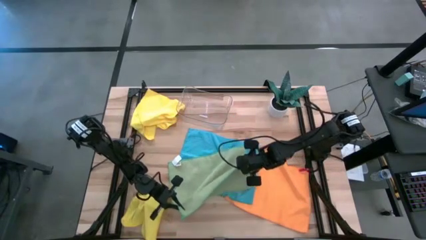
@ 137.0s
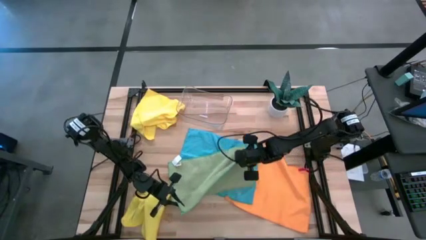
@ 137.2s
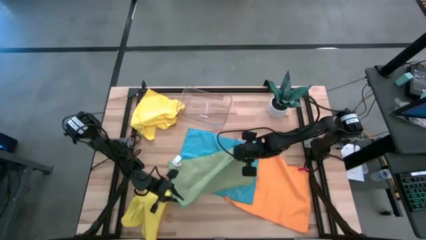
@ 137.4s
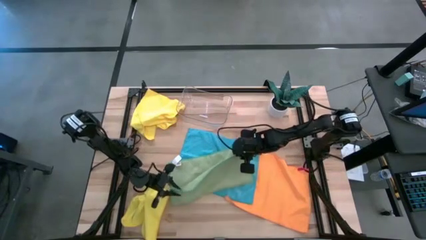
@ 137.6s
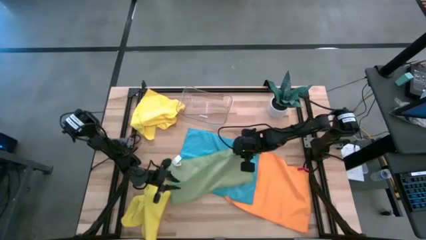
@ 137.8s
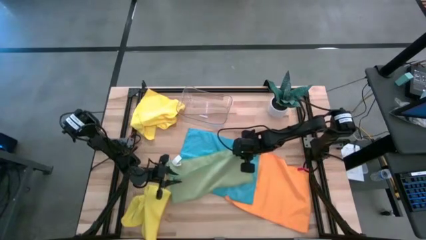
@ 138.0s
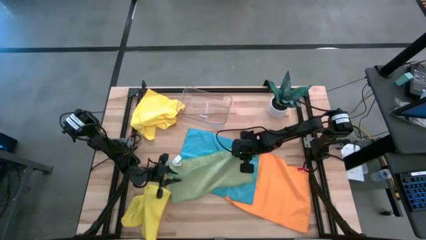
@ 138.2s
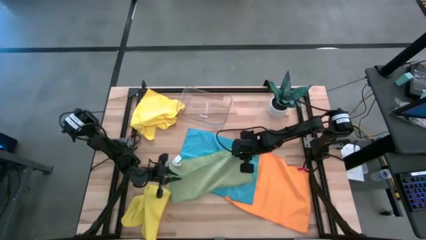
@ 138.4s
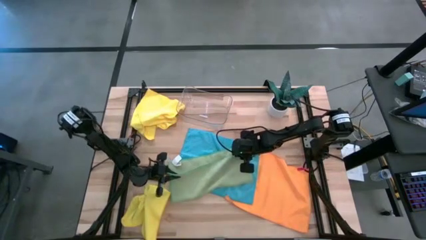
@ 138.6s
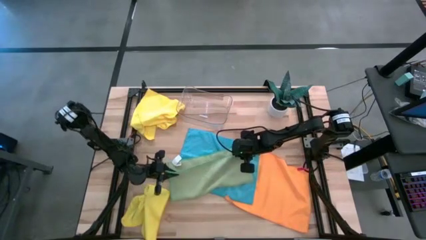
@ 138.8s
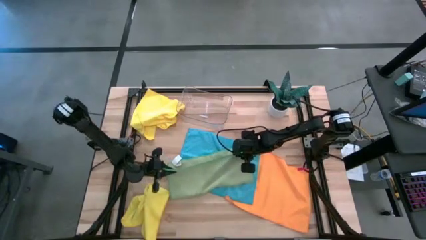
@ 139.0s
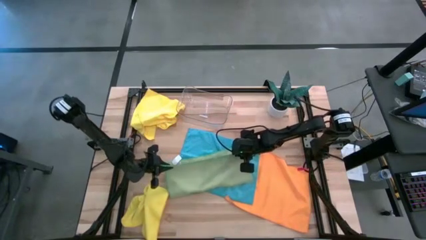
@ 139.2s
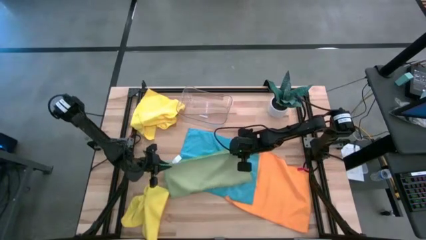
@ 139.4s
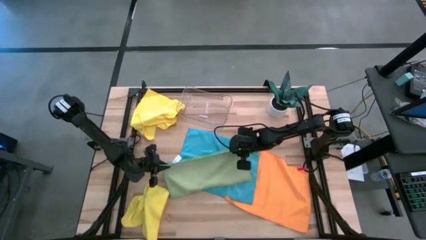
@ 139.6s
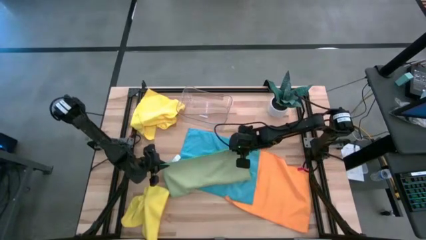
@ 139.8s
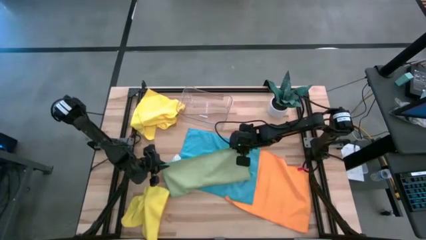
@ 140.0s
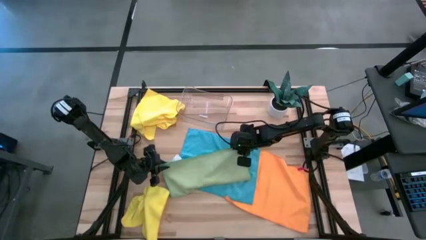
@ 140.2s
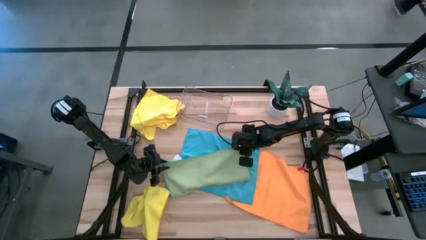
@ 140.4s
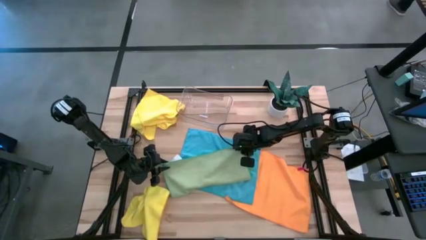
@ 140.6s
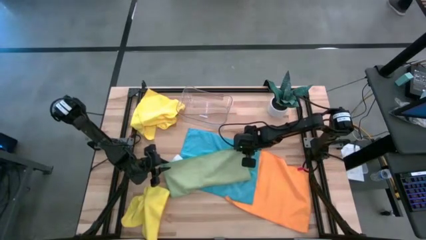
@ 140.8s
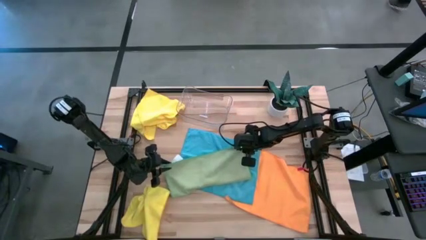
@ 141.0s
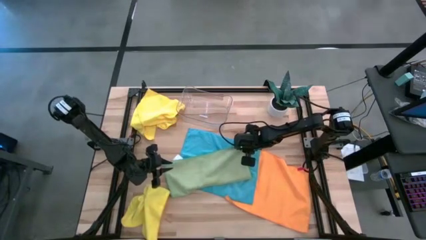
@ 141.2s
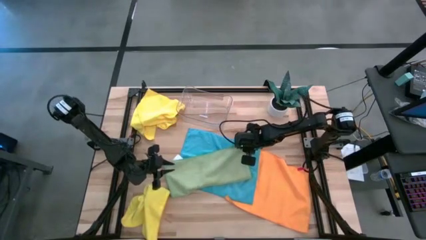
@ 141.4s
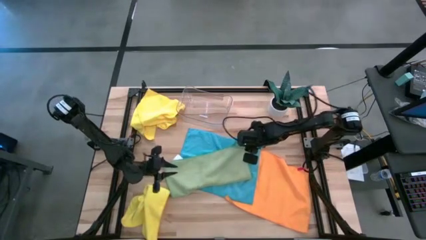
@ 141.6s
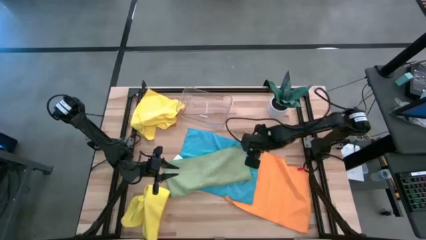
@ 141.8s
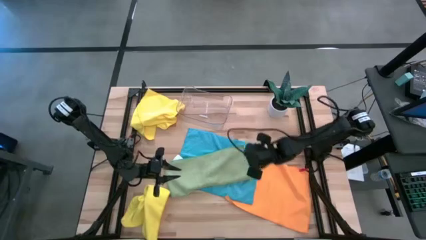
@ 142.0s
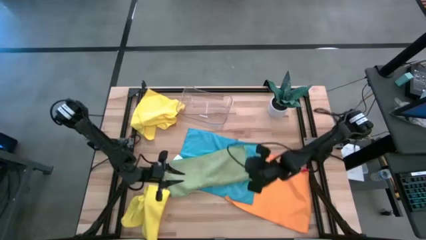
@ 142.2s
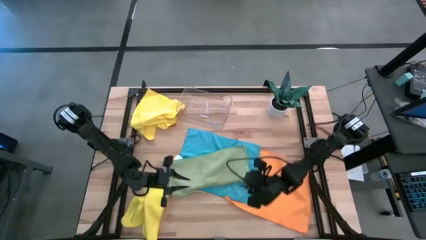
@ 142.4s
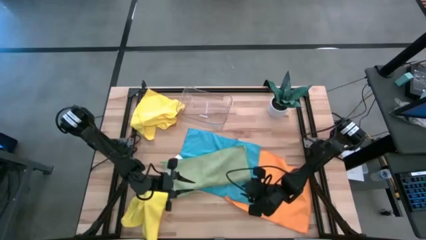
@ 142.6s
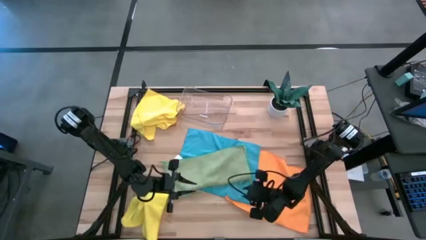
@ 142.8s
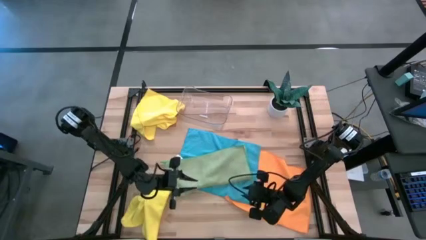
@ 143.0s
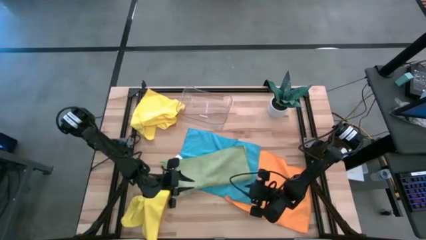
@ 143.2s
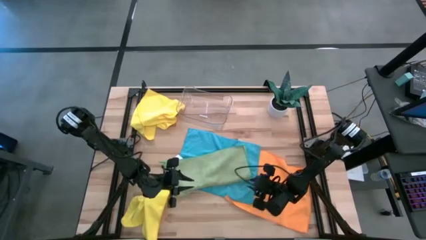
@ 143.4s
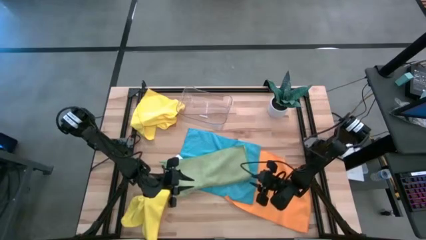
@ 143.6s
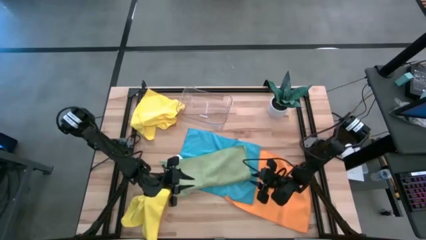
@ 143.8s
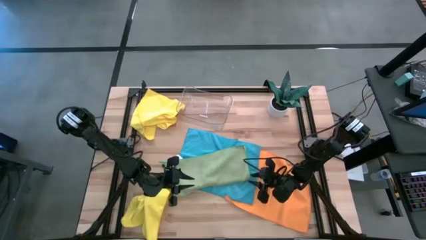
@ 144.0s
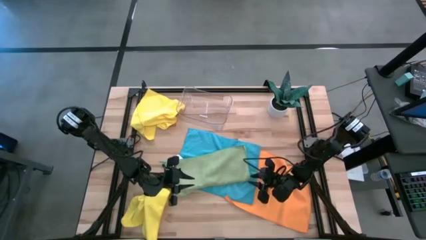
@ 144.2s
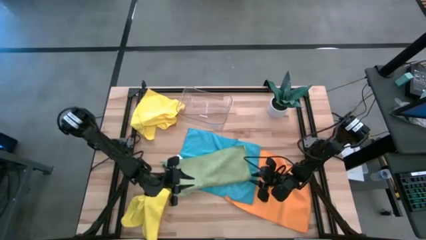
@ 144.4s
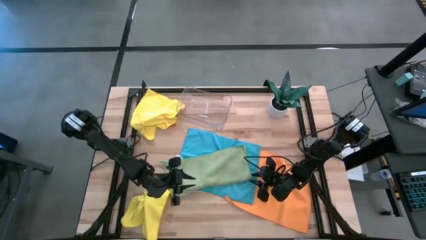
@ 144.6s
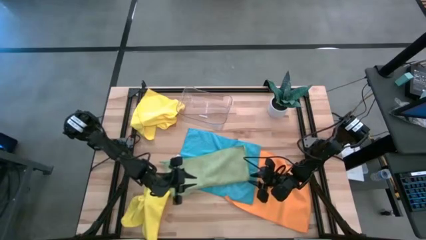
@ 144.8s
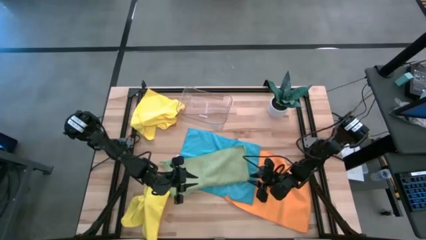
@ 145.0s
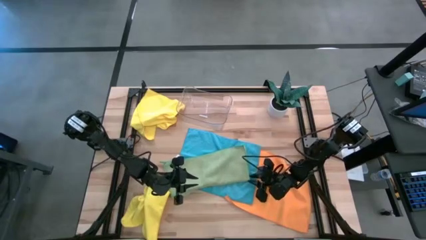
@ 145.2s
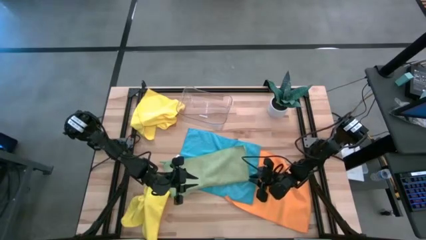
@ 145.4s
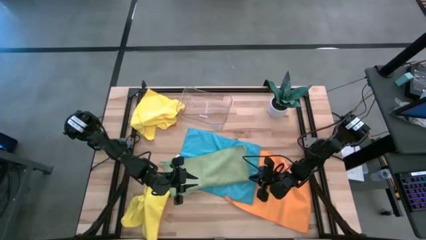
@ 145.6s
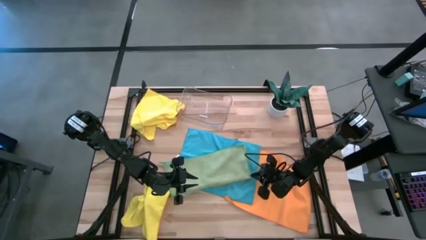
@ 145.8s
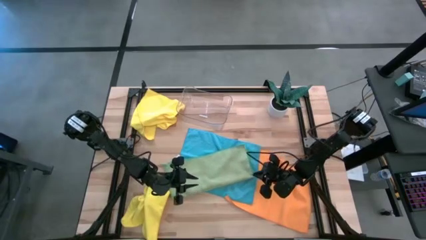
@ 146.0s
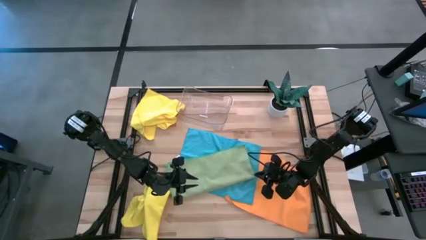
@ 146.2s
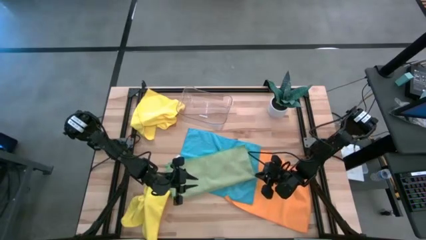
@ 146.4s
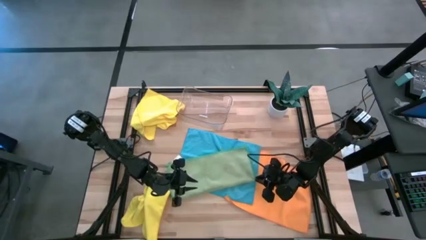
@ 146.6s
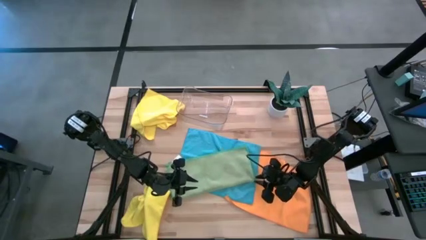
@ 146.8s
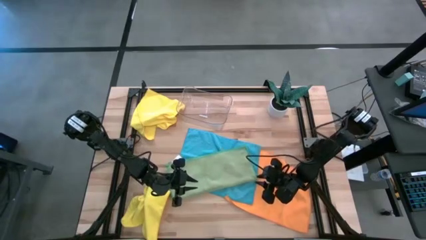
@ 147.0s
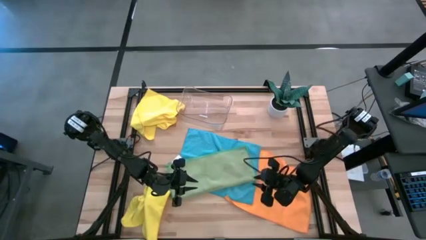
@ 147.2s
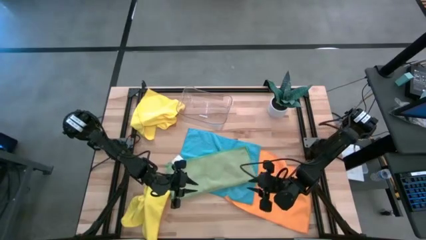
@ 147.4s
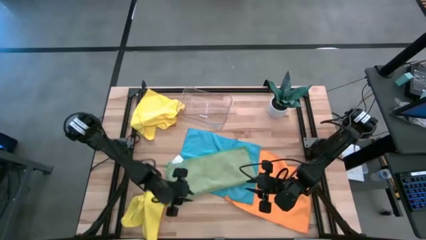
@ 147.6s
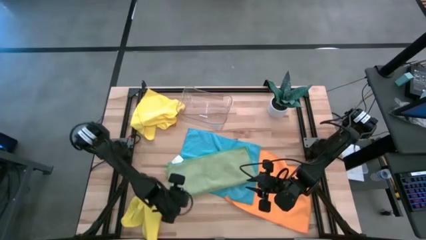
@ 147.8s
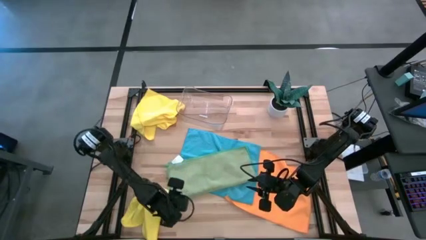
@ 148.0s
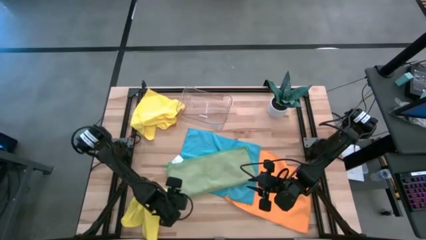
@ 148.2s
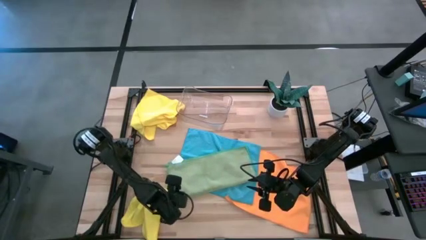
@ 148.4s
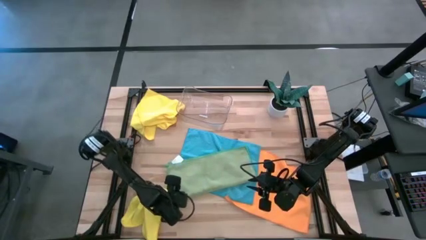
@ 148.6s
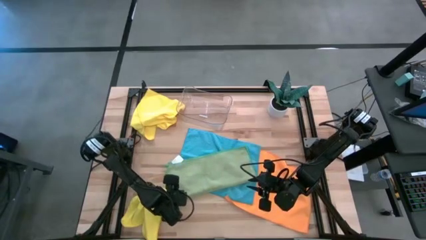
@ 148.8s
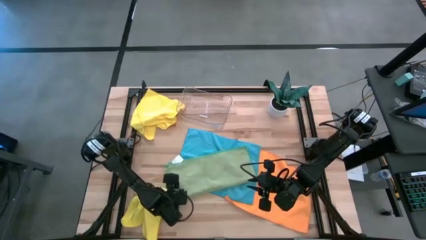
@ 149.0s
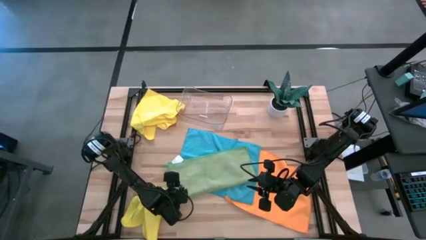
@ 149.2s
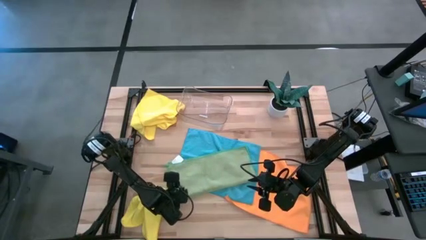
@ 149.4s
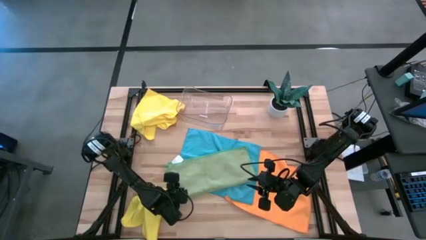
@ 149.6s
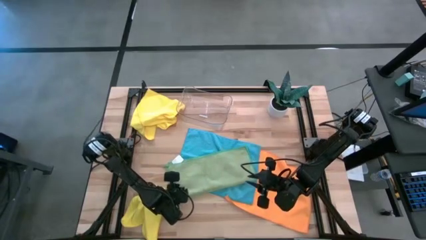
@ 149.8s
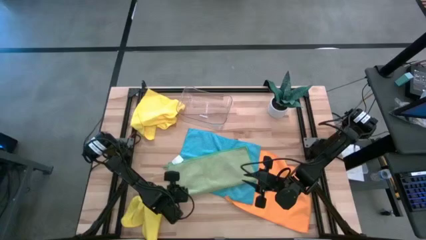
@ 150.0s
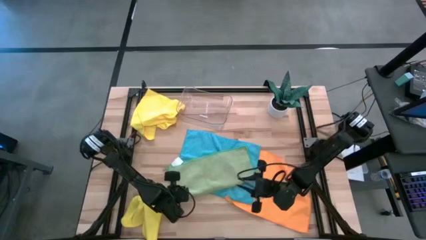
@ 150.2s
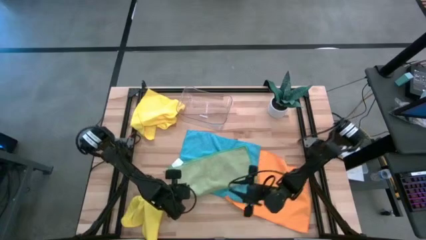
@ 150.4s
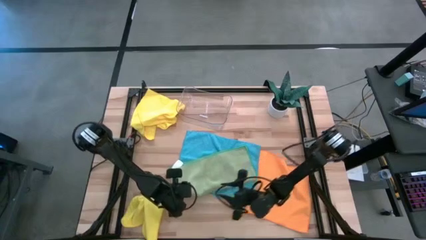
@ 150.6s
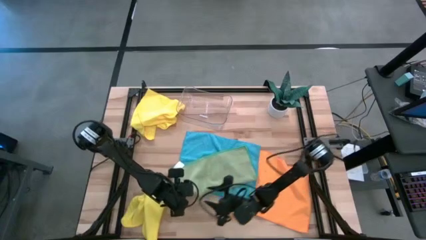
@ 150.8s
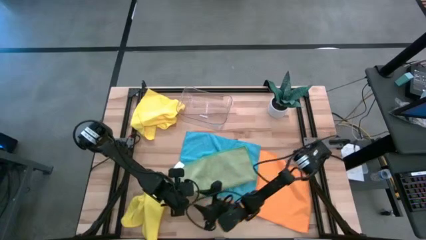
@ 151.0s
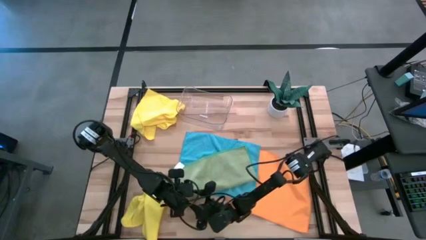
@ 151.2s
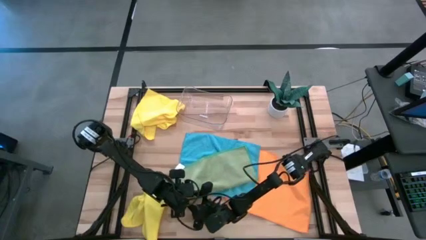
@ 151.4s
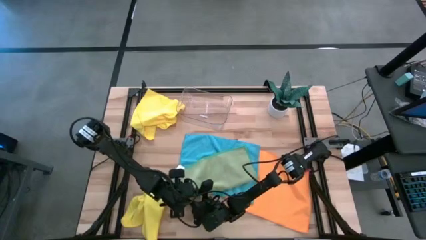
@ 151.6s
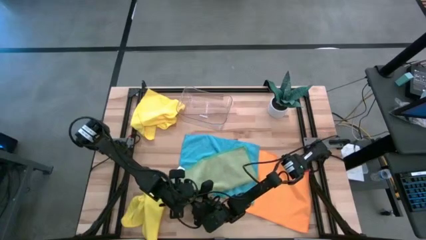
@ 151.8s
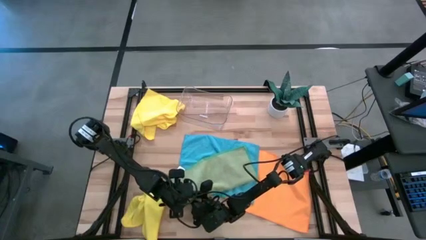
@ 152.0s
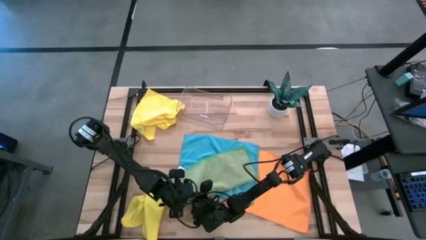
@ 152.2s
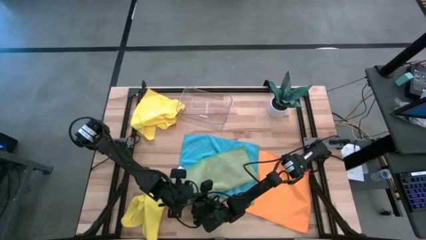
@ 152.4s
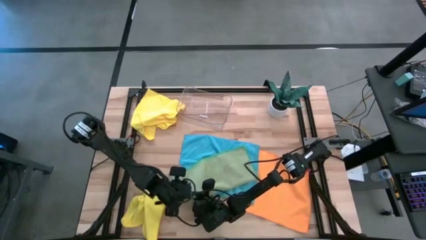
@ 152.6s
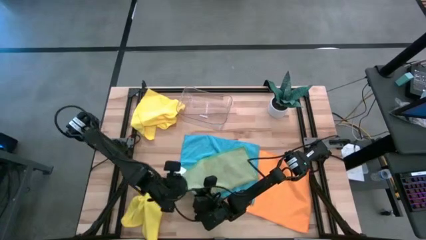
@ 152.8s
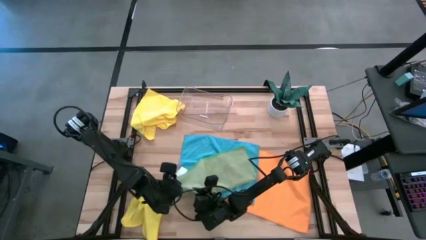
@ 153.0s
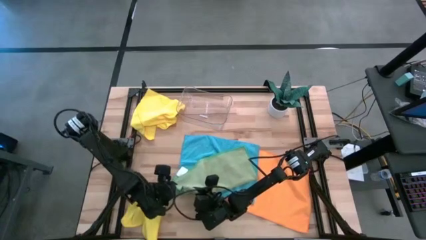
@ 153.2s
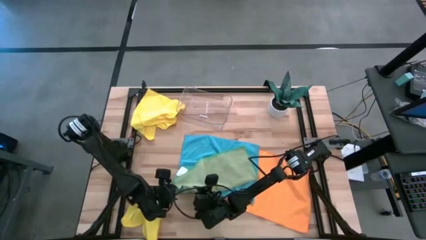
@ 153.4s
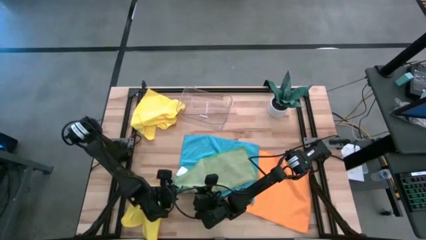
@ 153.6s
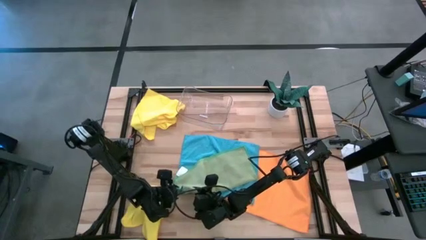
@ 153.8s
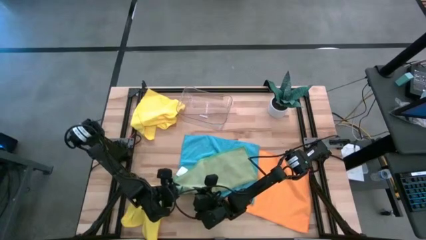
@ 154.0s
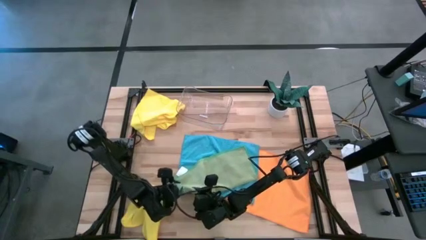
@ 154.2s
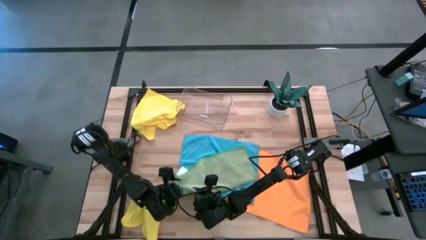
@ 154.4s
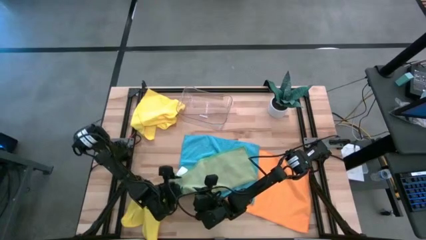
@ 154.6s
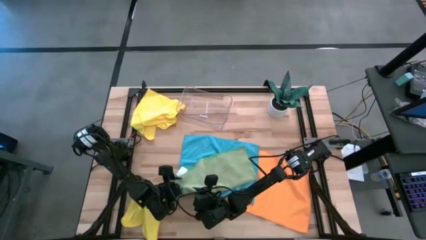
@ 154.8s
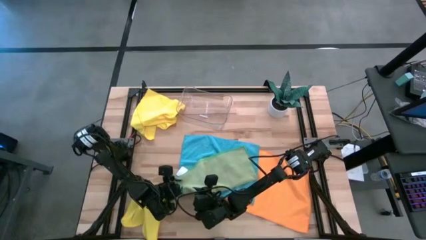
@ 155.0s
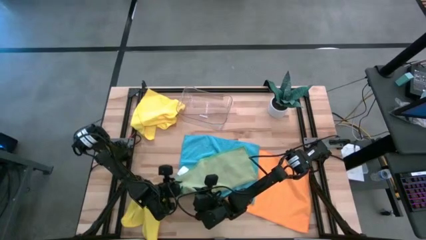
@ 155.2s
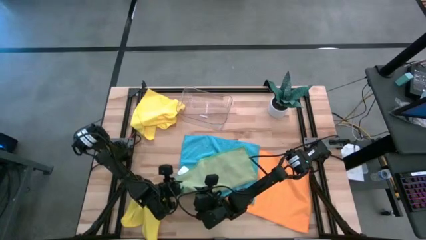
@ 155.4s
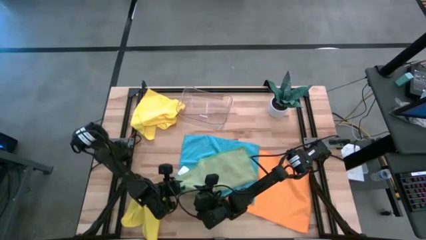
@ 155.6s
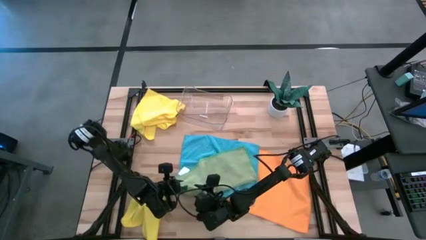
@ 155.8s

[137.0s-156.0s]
Task: Fold microfiber towels
Fold the green towel
